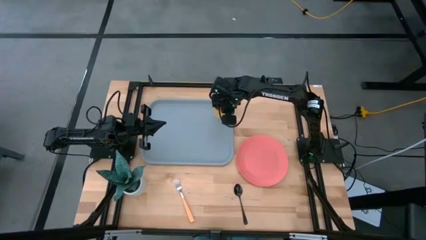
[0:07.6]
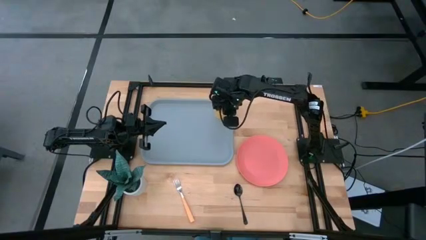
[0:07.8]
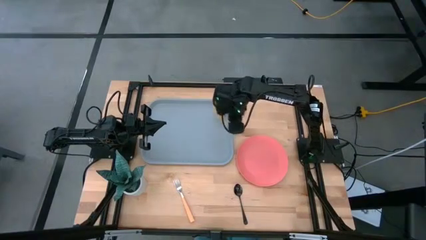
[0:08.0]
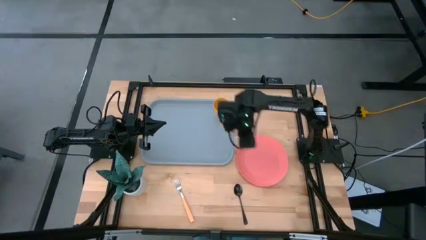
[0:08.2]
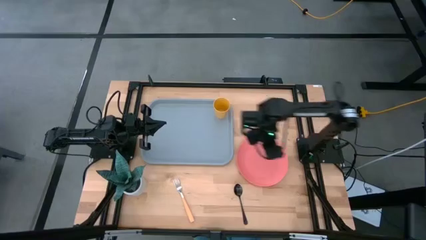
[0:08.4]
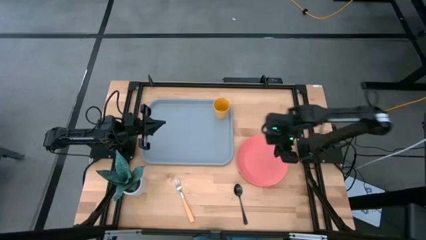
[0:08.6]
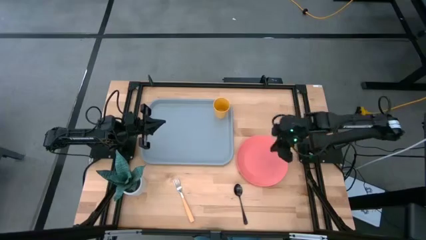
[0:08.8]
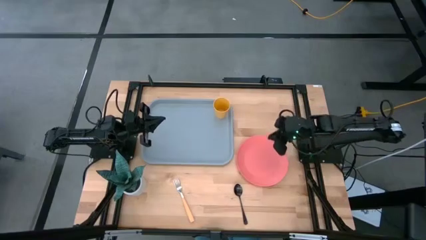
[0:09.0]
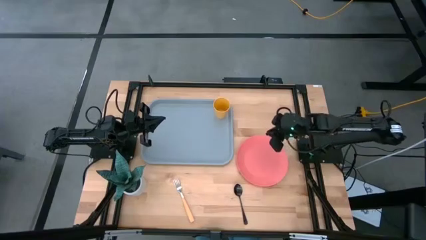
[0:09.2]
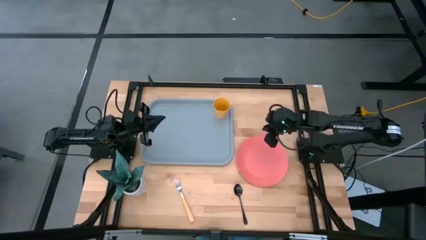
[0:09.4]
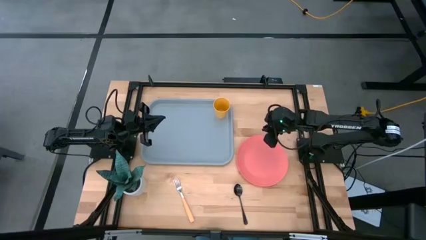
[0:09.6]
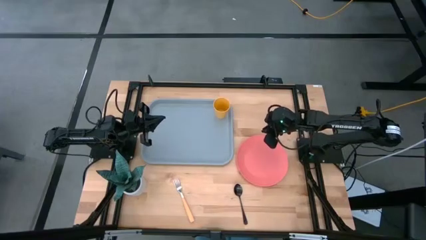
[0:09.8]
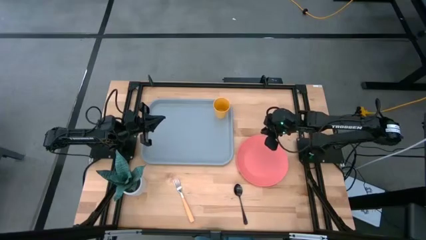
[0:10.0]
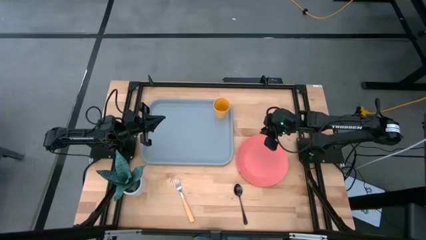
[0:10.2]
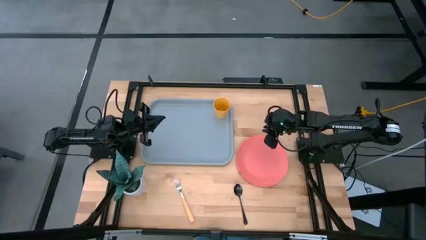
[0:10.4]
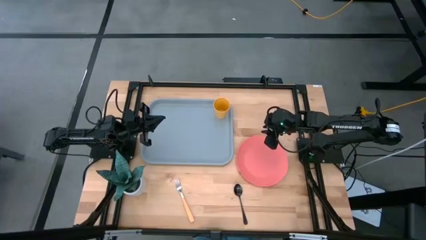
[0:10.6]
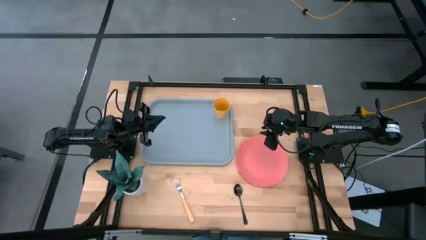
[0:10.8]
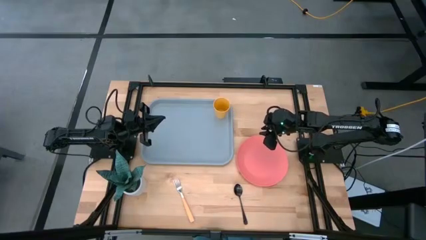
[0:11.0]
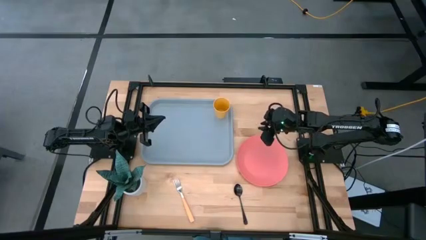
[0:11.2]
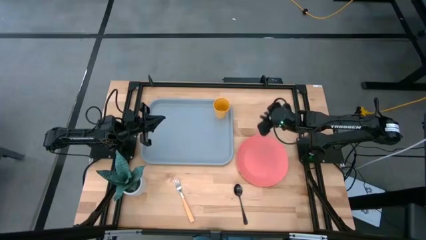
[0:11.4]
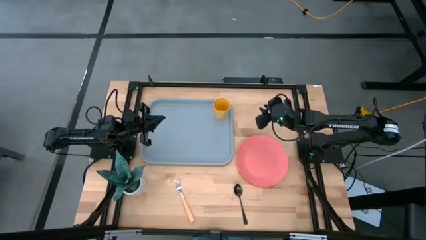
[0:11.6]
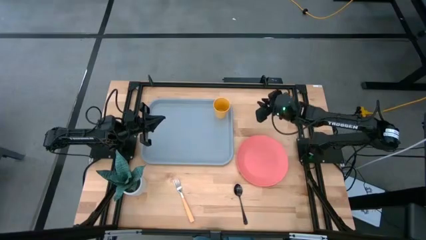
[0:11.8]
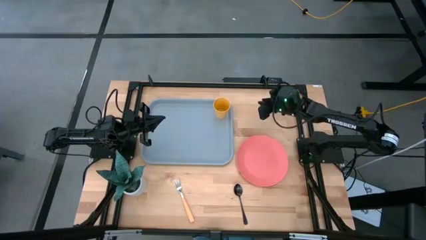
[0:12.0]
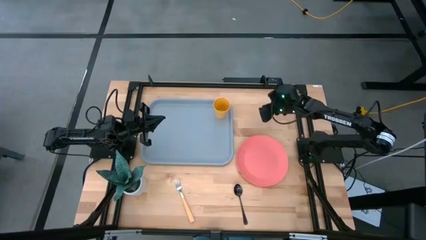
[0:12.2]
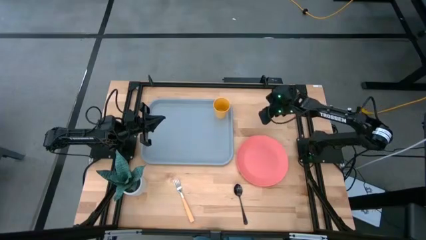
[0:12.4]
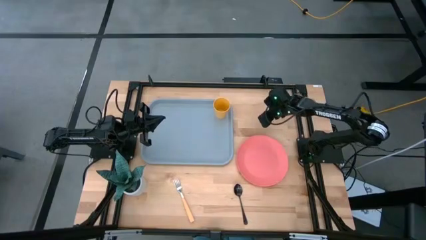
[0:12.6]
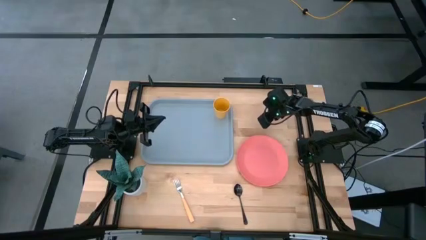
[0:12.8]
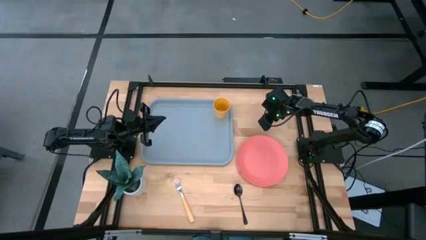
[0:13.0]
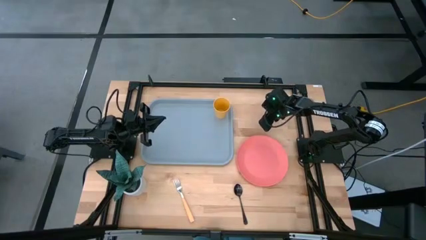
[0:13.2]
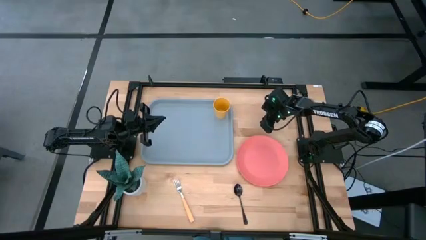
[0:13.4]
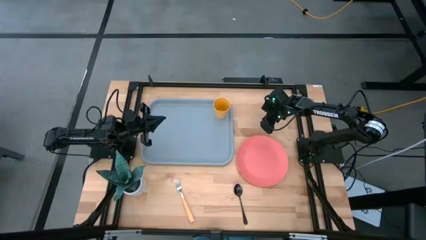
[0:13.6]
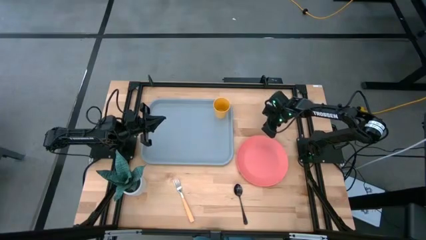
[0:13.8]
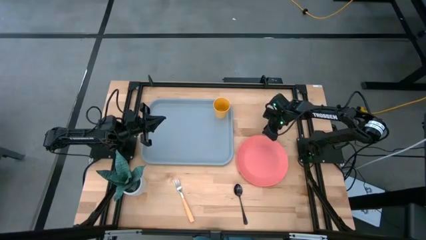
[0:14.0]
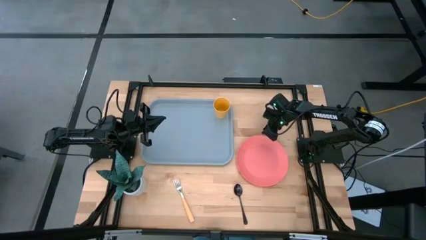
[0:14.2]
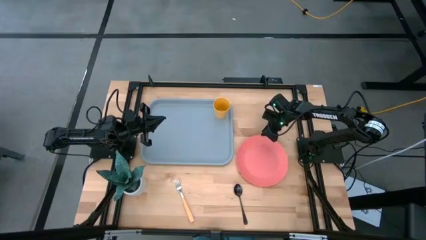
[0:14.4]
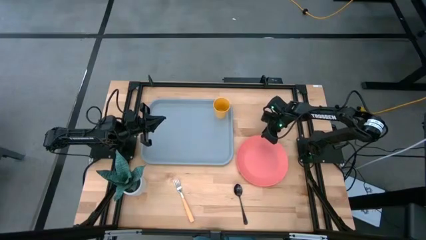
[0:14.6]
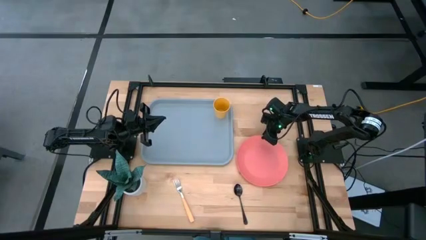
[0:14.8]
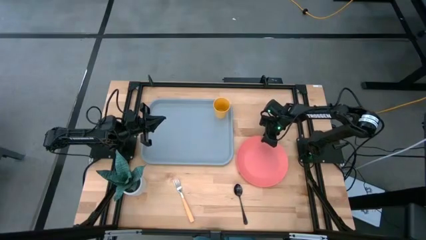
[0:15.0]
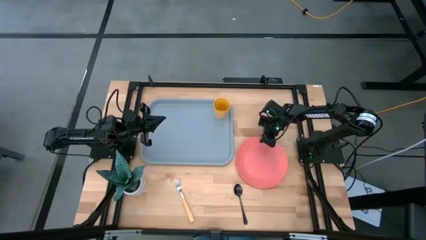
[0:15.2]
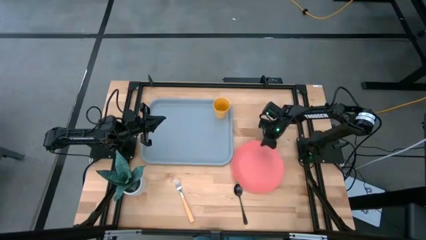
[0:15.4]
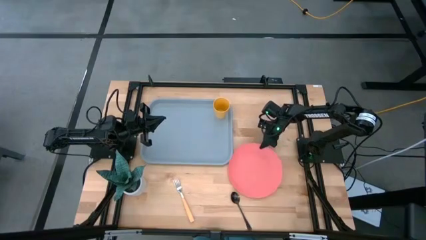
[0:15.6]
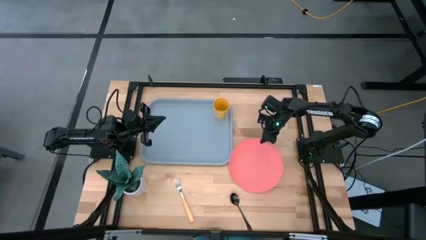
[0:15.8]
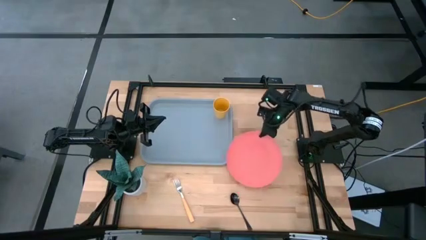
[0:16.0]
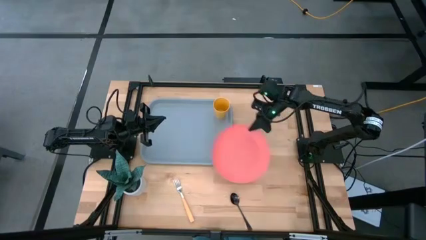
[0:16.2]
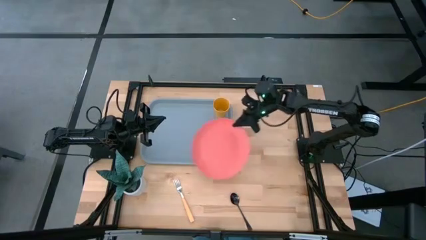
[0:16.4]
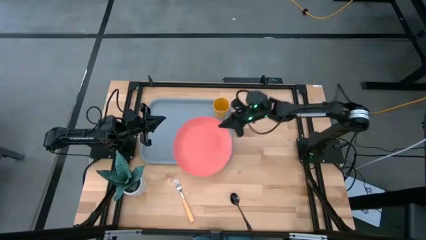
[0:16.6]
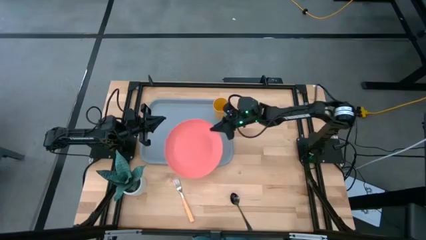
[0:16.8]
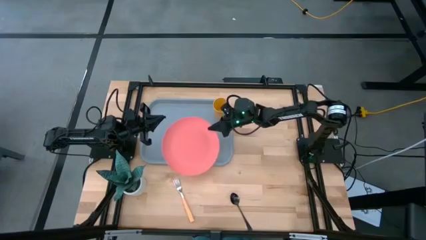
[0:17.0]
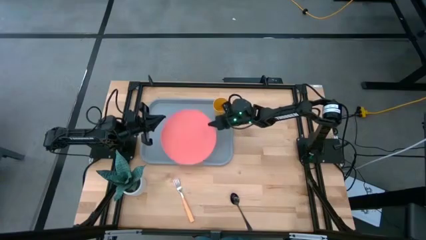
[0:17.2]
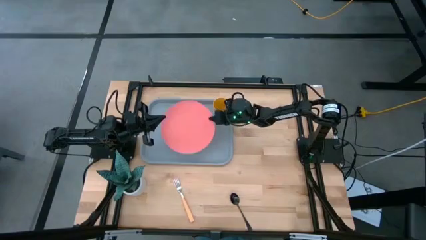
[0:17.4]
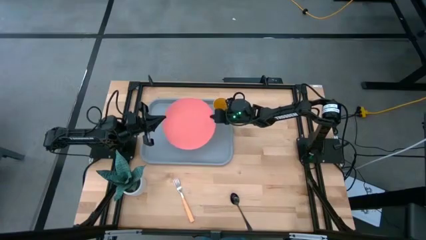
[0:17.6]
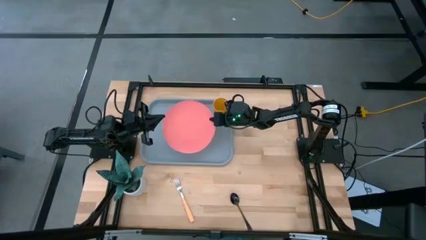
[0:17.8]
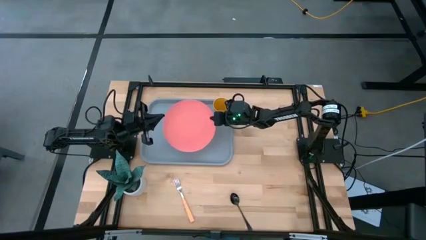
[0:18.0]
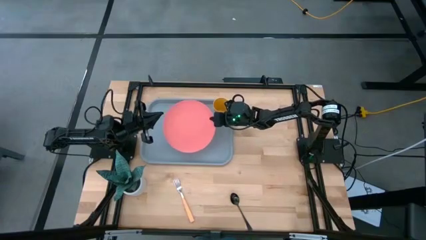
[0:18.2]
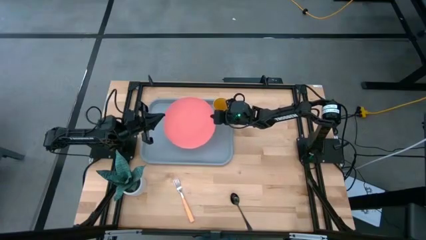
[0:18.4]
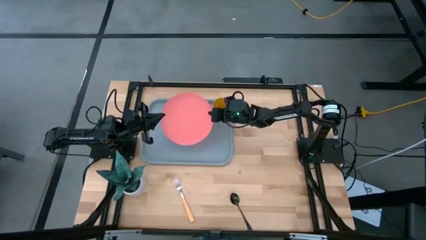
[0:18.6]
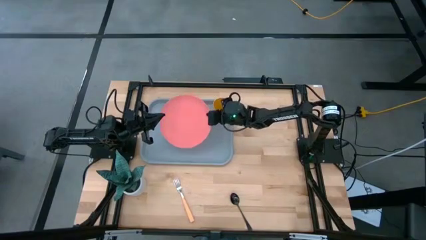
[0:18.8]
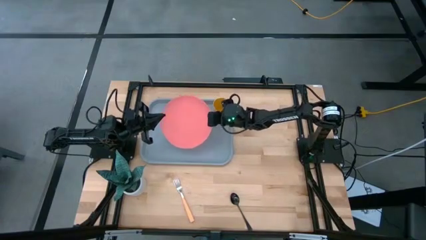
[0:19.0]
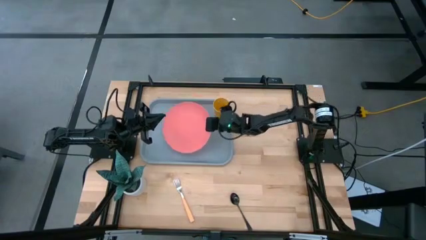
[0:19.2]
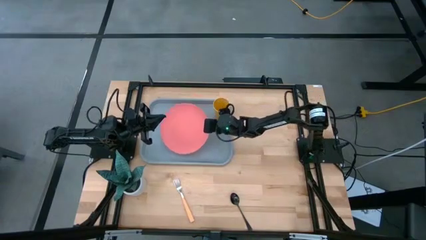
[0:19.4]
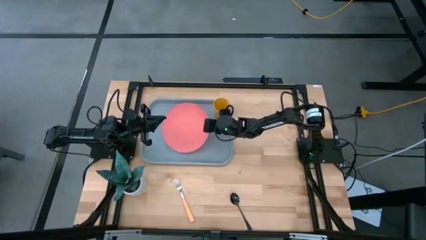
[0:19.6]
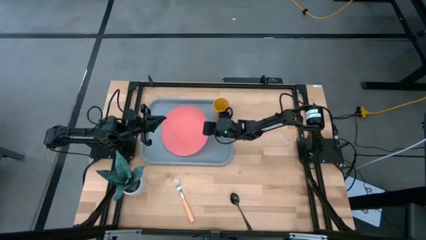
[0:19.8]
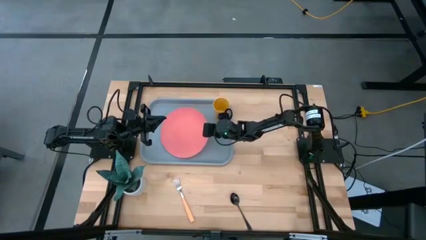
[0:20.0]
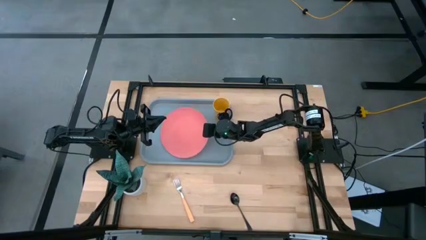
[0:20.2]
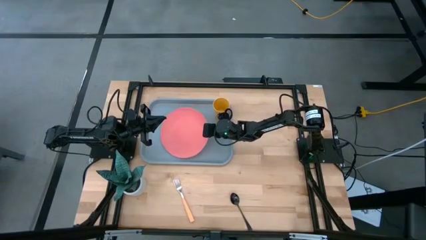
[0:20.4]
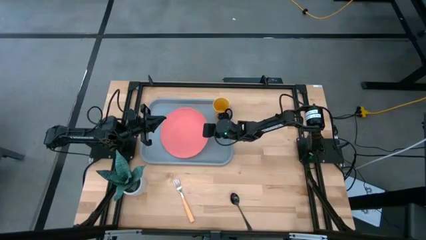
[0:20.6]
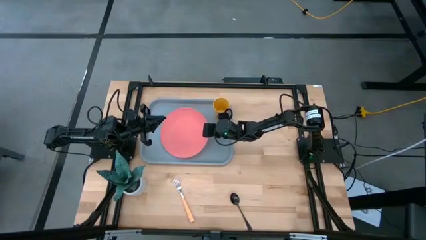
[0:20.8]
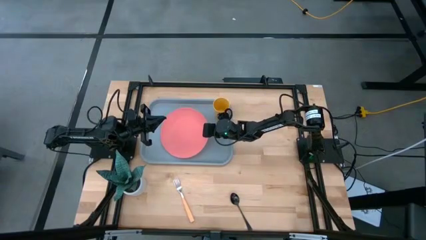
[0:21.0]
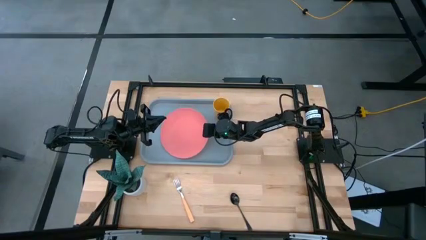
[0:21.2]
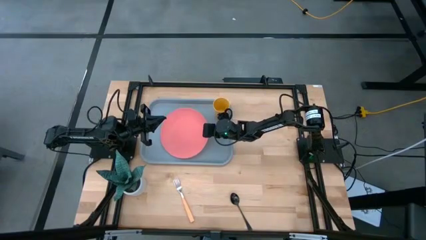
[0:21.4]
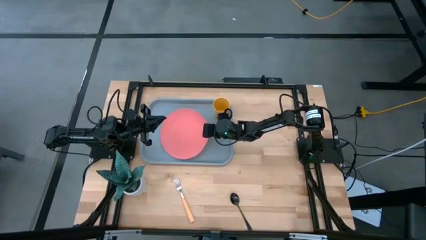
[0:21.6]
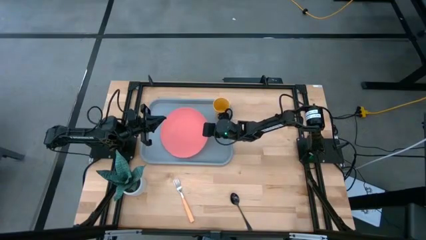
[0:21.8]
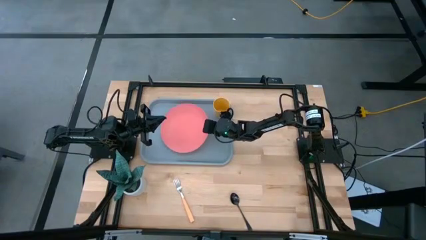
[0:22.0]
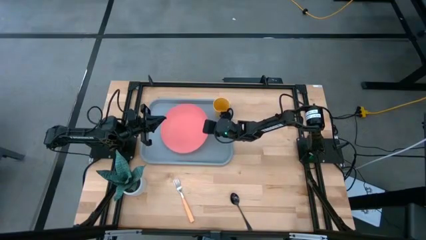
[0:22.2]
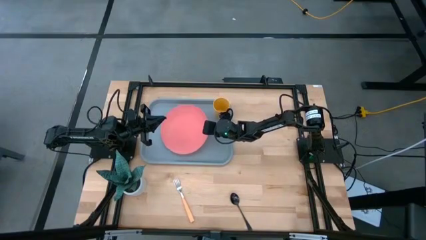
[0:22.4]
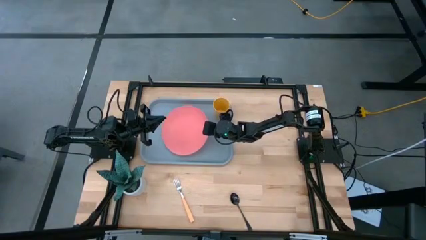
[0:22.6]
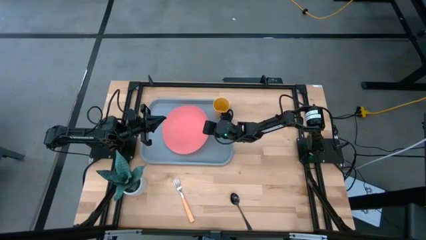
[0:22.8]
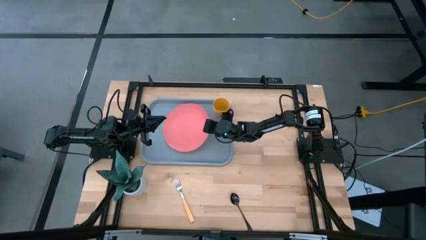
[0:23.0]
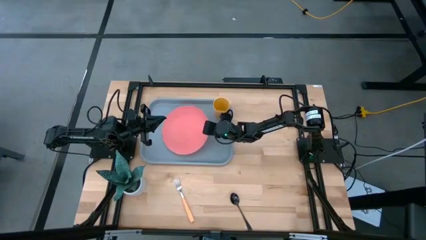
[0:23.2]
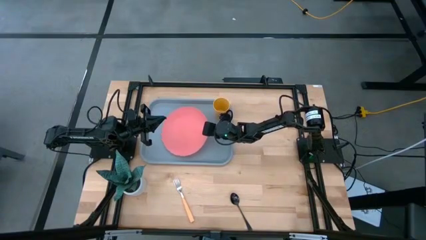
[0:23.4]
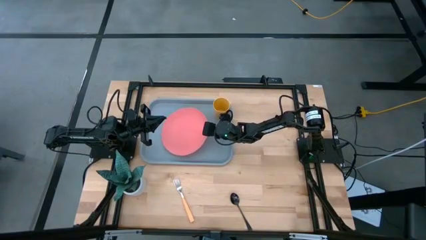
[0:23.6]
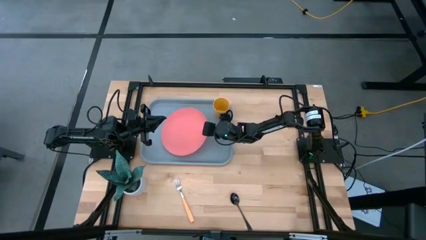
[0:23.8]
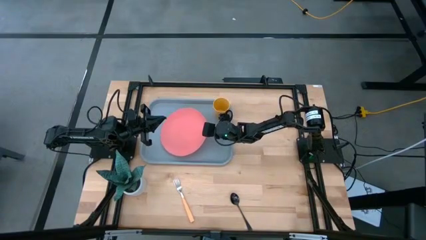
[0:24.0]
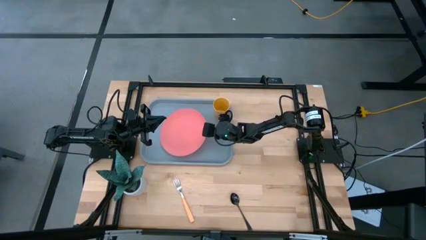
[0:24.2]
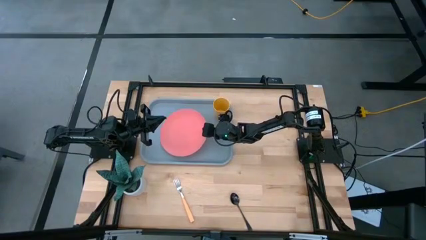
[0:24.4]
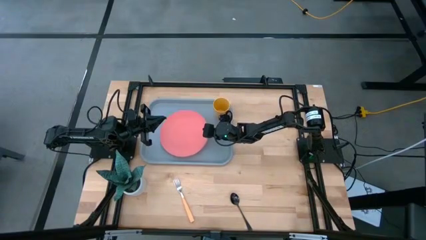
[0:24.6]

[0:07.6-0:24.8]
Task: Pick and place plate/cup/fork/spoon on tray
Put the pink plate on the gray tray
